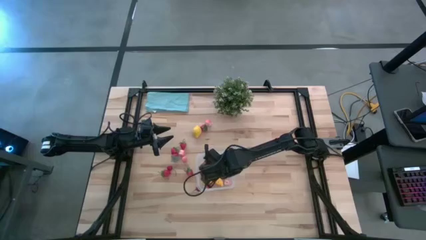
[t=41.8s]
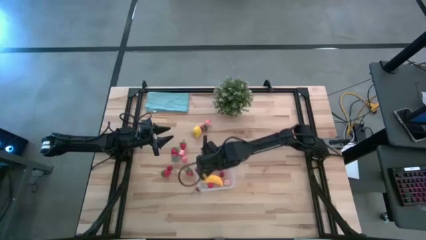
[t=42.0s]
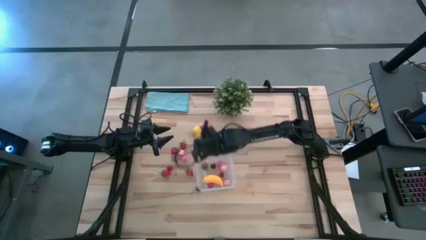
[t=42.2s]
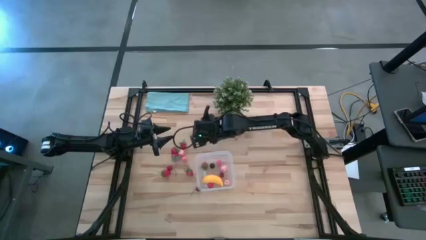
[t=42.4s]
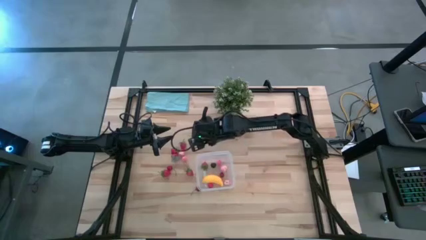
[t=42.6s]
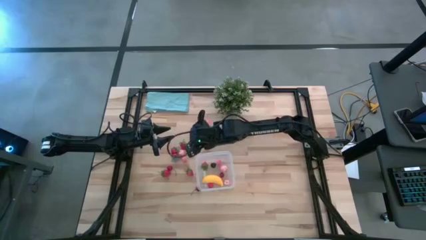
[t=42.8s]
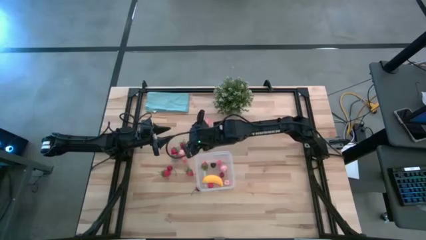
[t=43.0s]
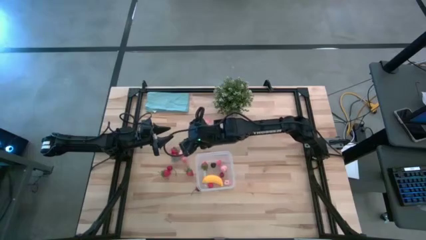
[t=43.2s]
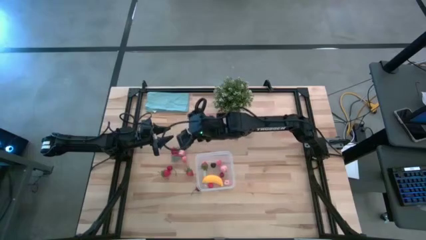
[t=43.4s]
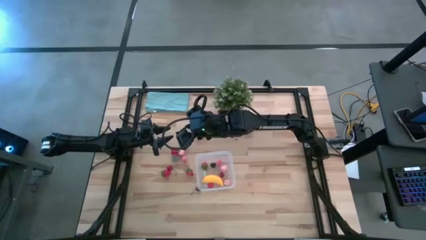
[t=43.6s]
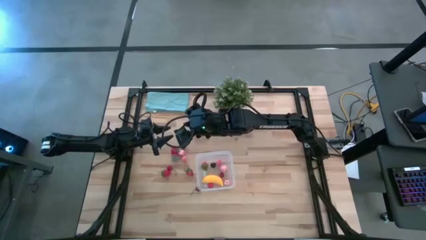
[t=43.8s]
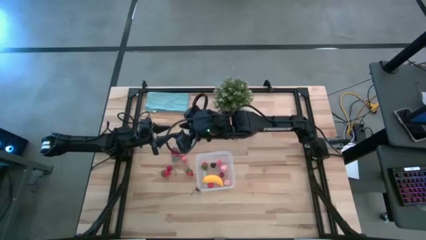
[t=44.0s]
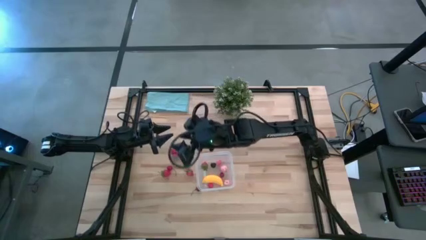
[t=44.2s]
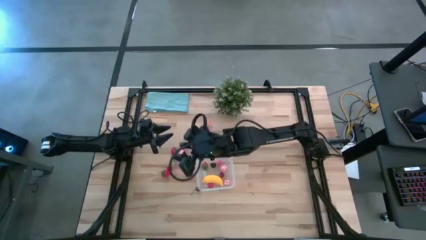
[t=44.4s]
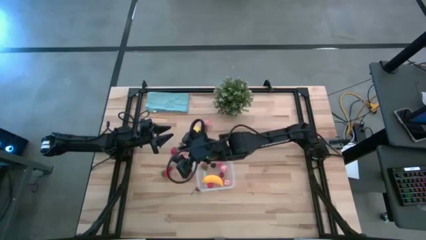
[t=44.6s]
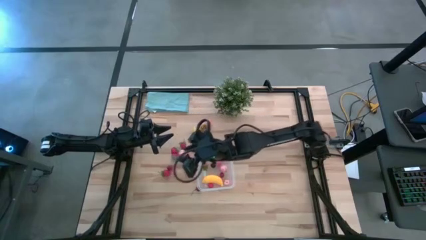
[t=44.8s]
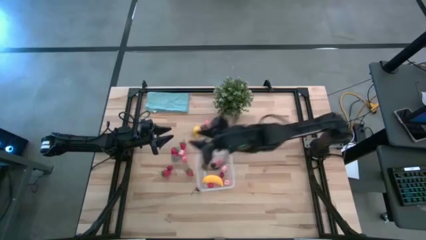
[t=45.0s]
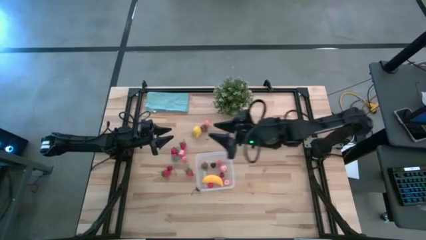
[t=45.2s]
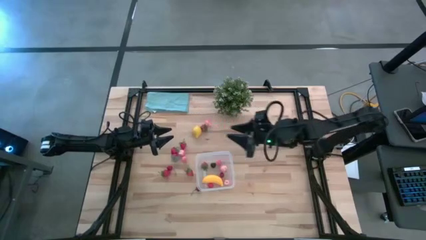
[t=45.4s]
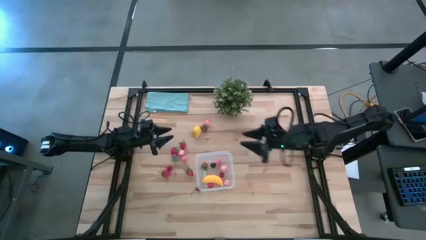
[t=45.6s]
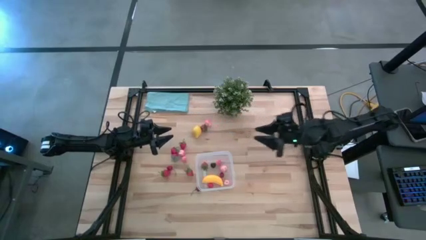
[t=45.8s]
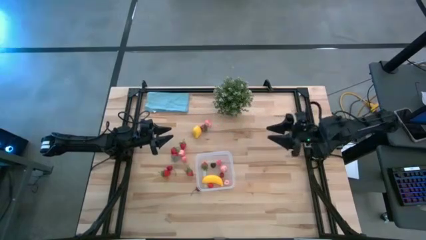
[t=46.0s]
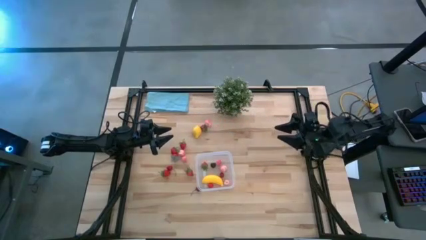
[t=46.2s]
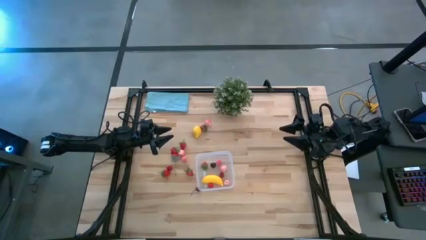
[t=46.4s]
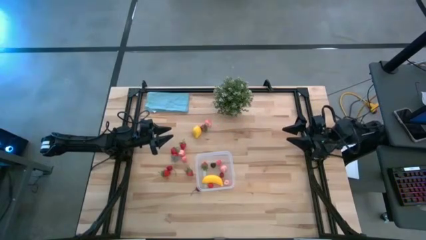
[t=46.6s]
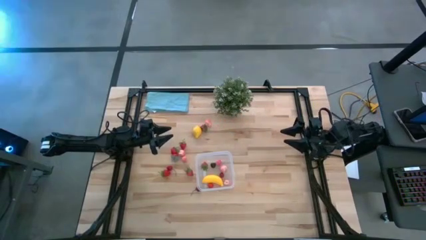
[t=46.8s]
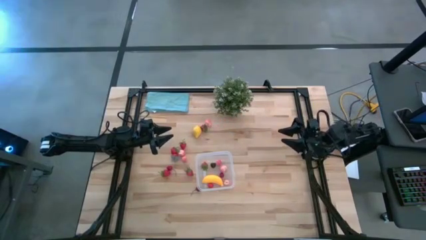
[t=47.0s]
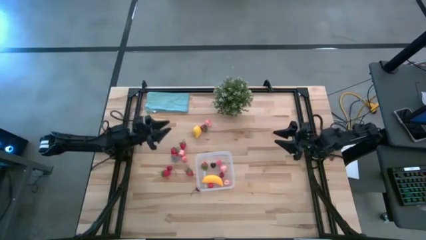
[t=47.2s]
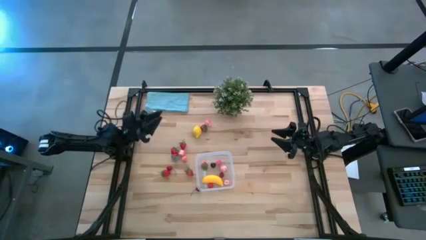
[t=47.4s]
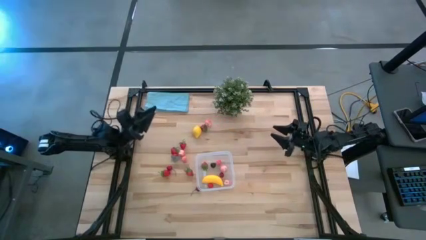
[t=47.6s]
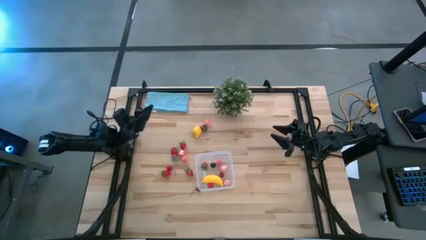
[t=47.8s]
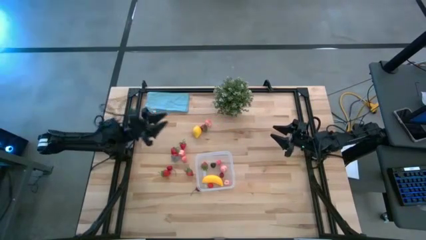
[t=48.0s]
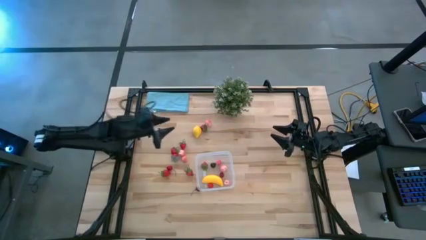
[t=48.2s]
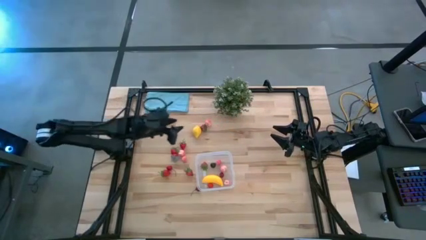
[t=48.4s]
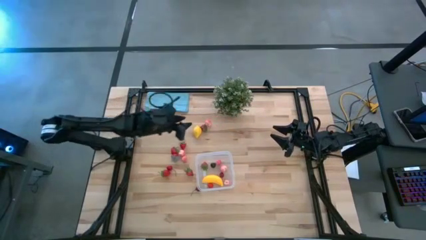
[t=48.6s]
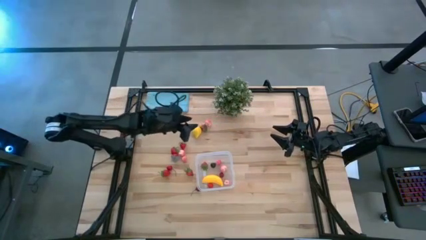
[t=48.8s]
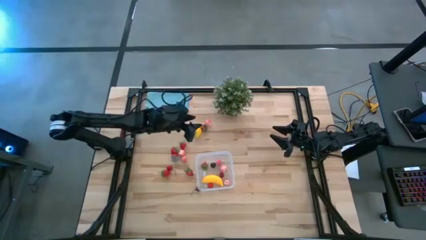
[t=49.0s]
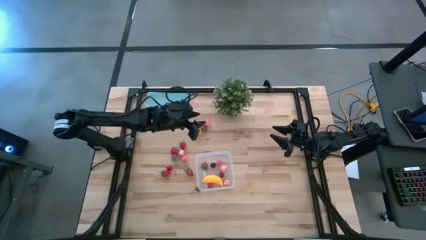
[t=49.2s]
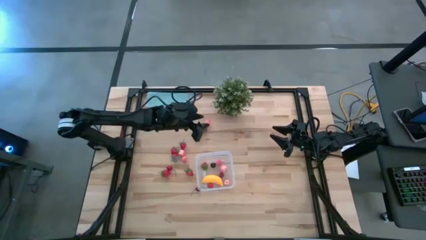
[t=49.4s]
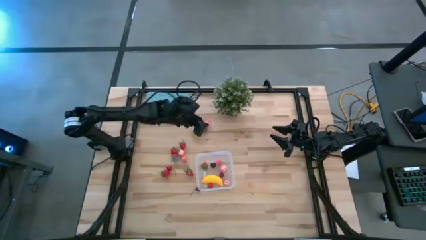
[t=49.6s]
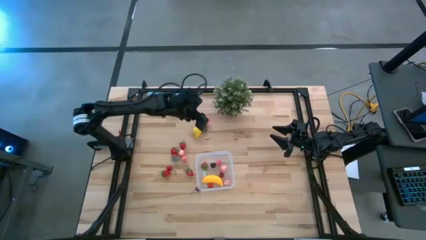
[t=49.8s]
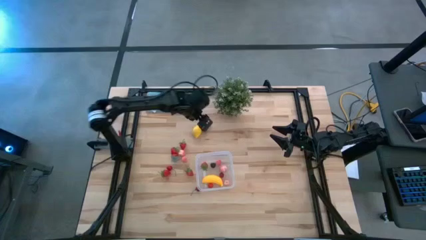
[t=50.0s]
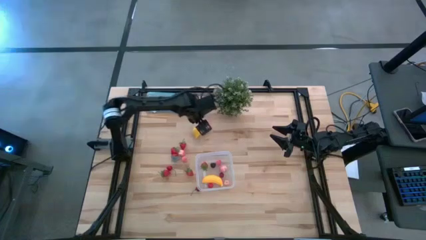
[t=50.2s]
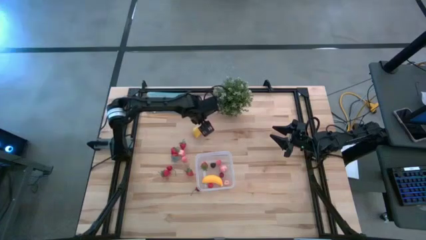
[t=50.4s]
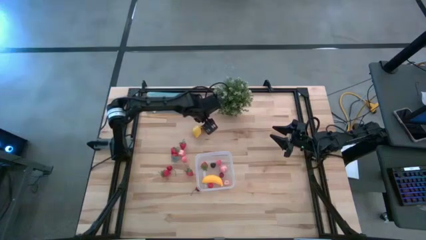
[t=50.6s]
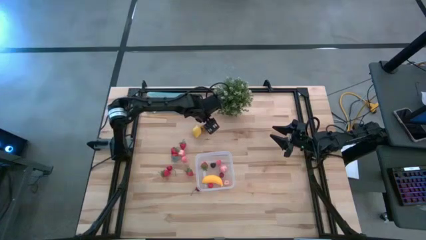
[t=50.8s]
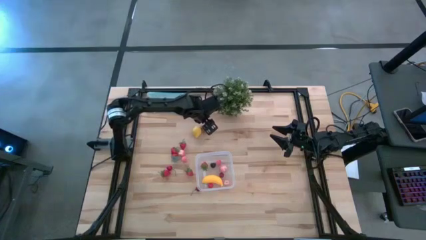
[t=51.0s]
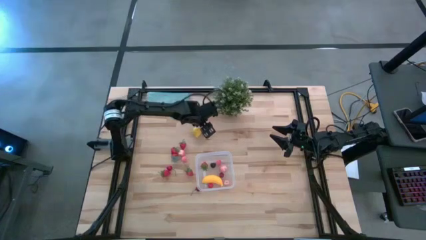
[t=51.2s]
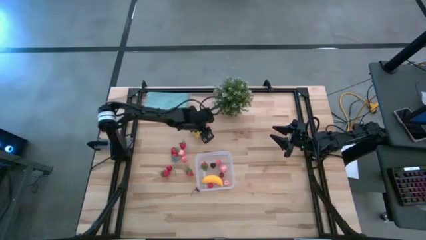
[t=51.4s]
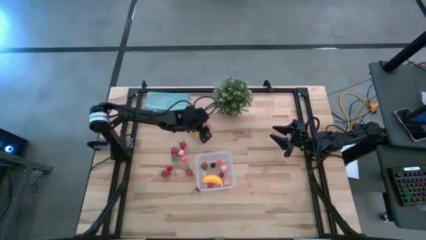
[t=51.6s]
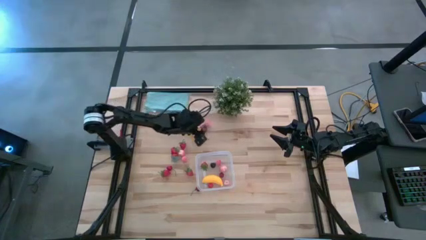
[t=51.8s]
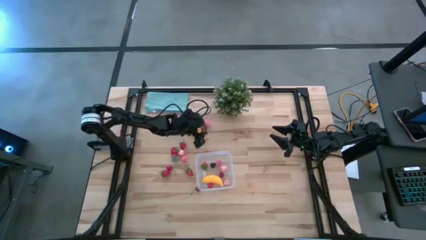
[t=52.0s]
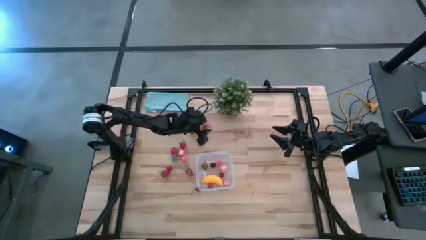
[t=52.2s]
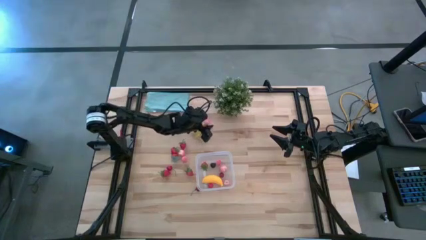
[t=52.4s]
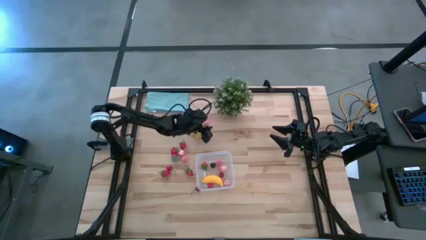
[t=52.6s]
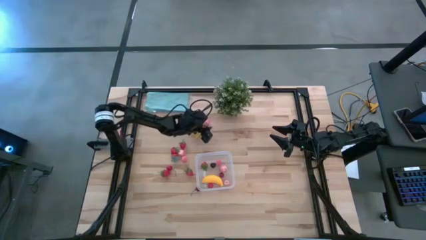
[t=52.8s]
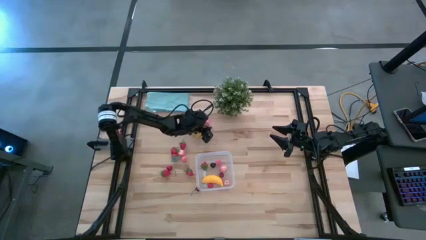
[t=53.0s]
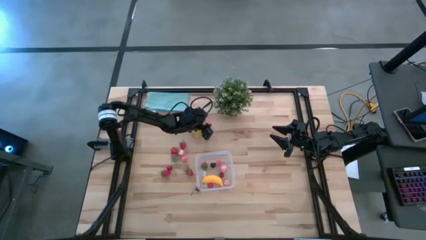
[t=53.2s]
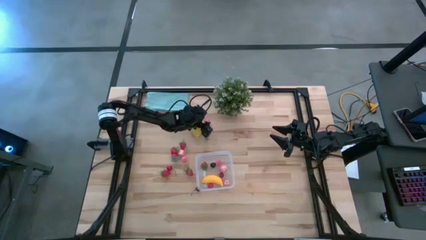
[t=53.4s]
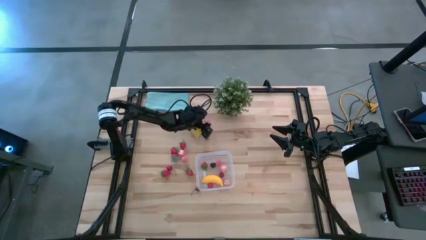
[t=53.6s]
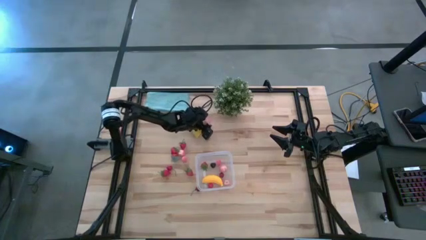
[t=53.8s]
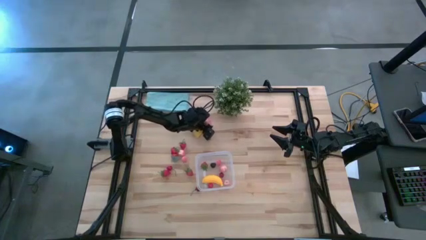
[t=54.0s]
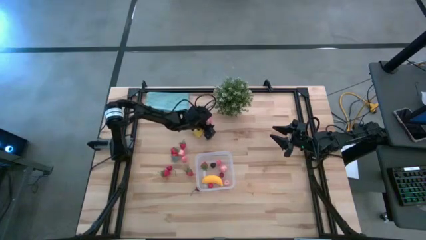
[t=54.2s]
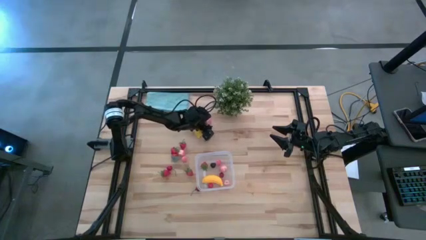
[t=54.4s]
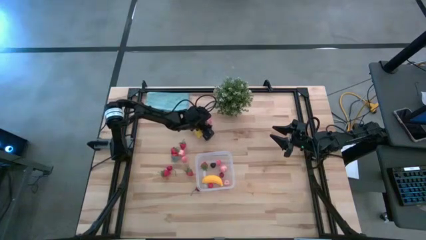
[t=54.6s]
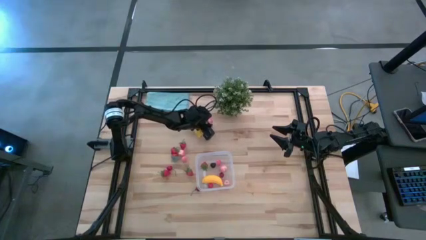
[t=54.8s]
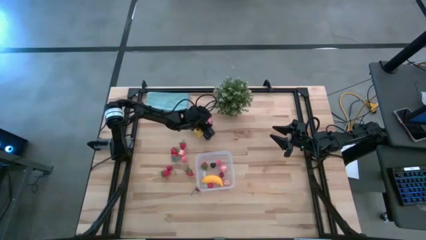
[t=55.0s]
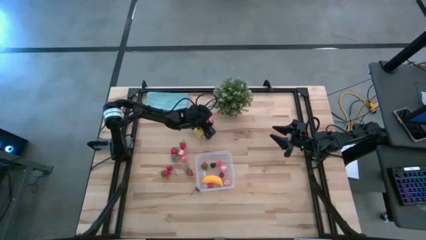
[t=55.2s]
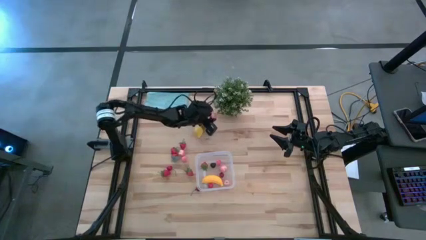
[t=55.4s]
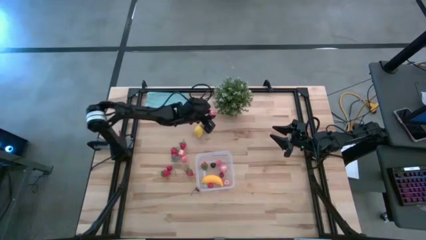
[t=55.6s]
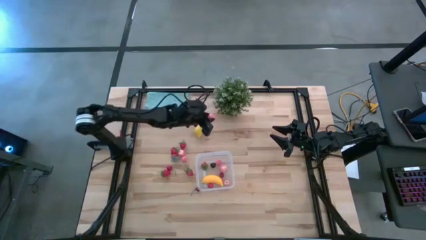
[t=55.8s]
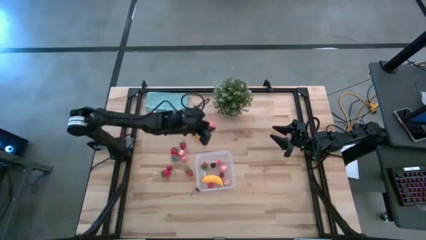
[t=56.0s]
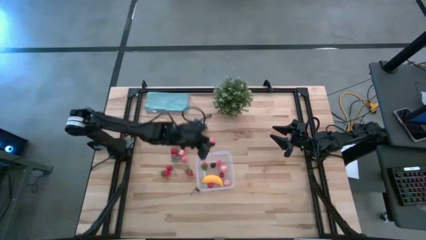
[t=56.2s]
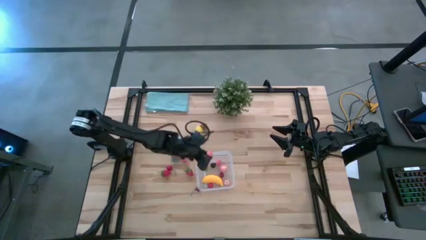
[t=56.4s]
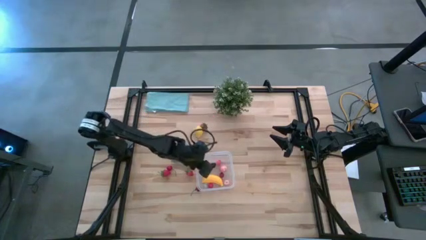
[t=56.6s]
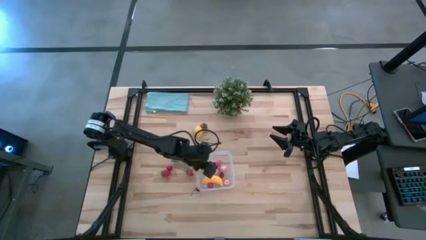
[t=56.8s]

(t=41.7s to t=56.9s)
Task: Pick and placing Produce into tupperware
Put the pink peach into the transparent bin

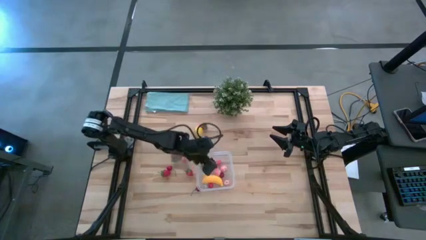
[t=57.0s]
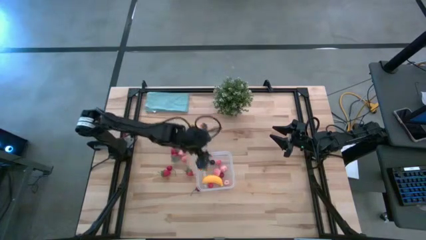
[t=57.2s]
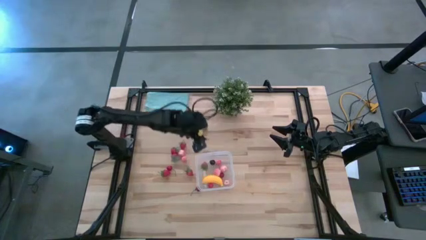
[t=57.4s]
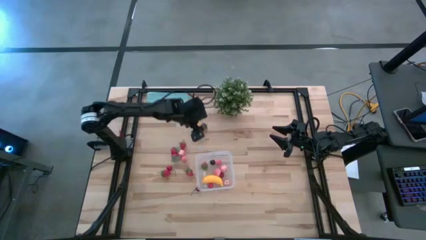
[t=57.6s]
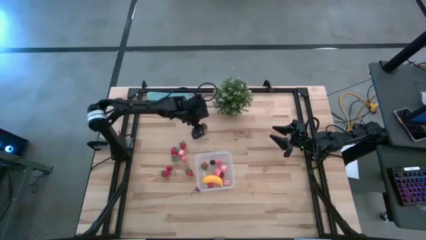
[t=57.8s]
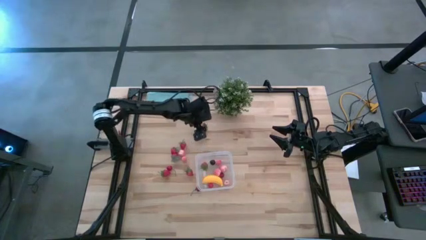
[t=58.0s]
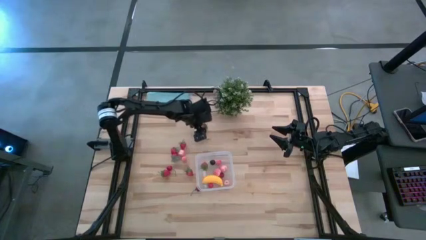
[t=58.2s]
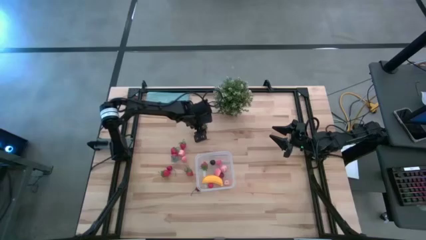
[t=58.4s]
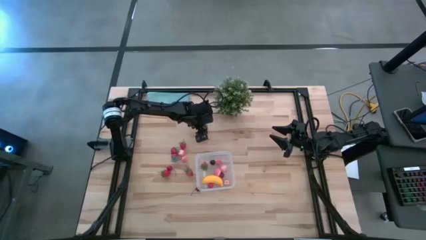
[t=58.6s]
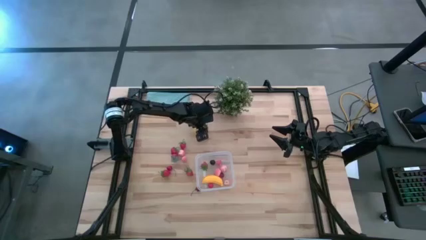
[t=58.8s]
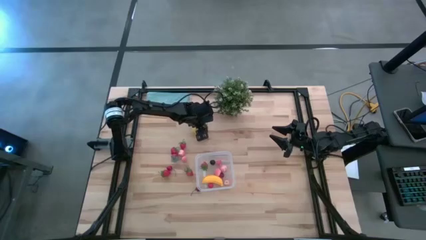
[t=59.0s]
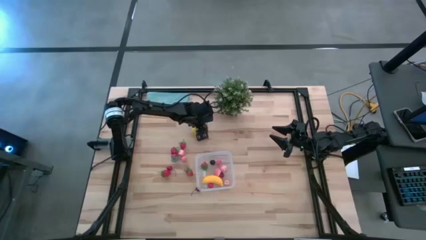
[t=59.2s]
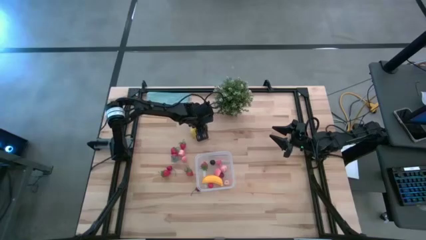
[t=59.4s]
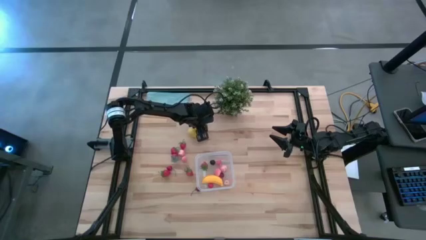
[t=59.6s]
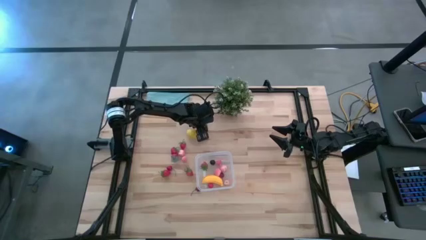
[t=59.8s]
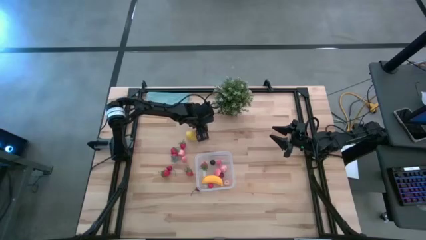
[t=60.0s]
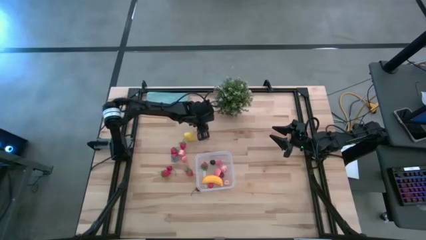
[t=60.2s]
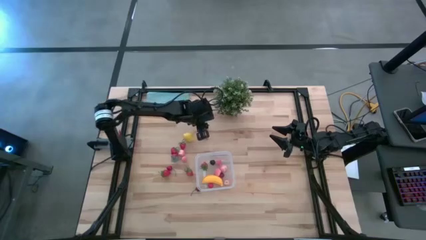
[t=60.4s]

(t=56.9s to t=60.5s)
Put the red strawberry into the transparent bin
